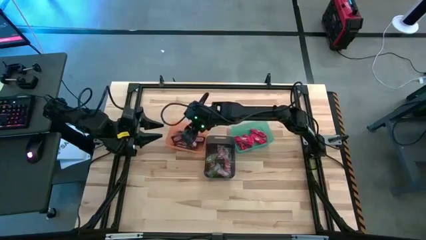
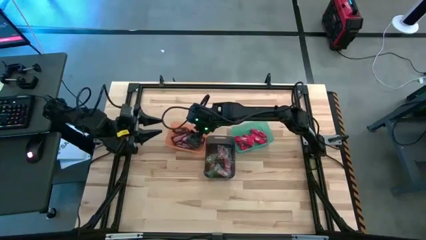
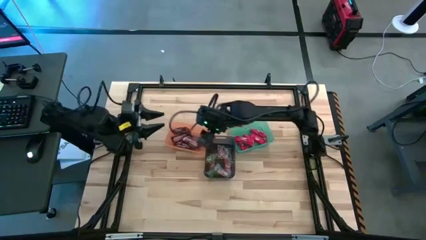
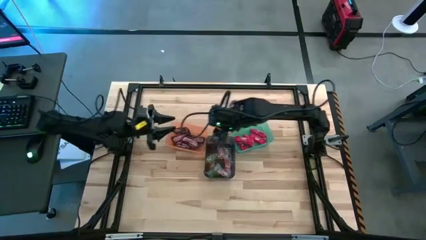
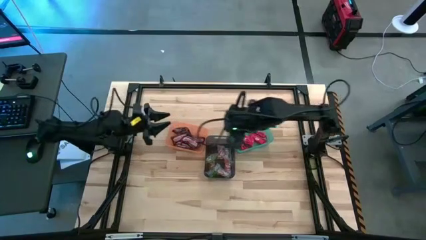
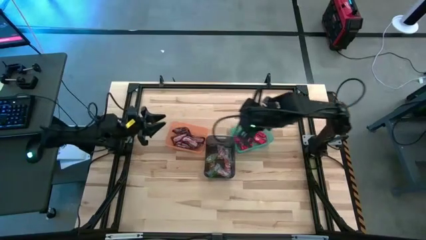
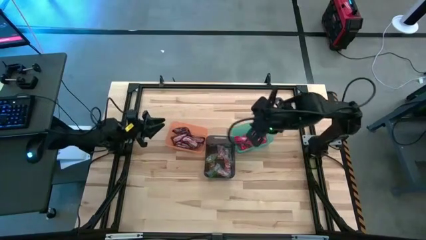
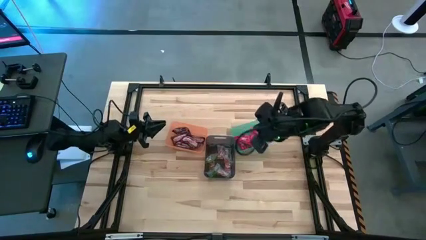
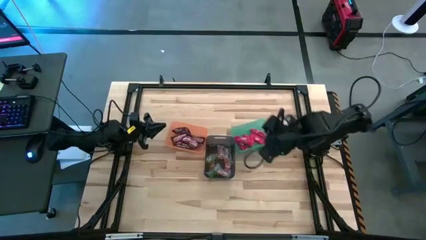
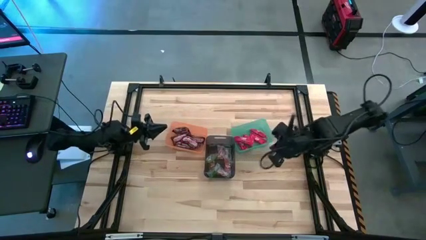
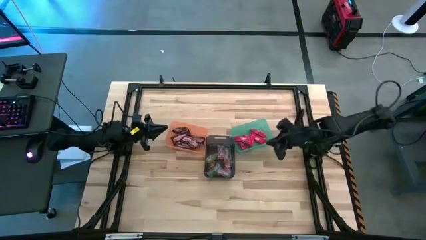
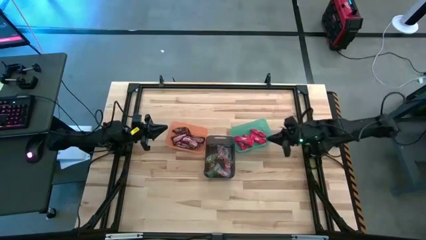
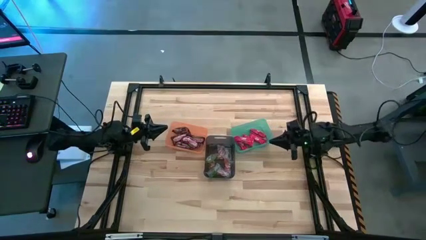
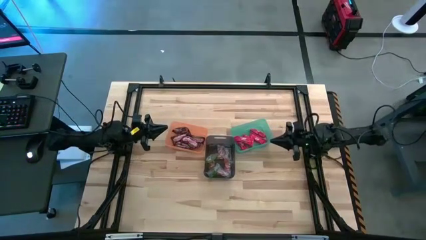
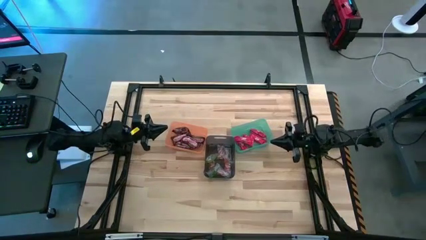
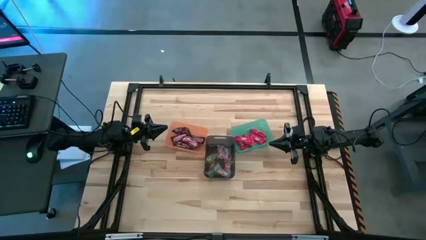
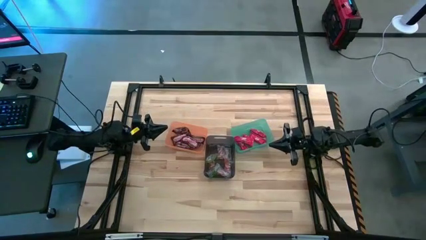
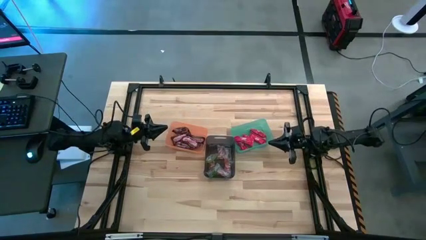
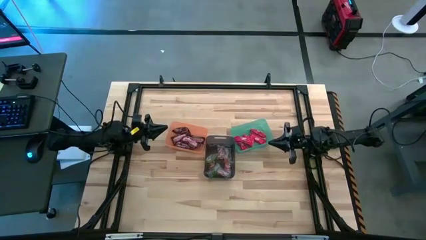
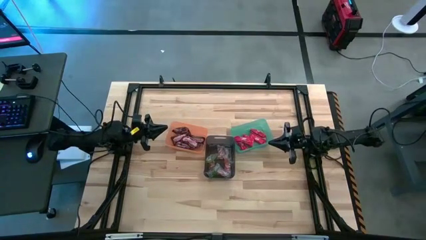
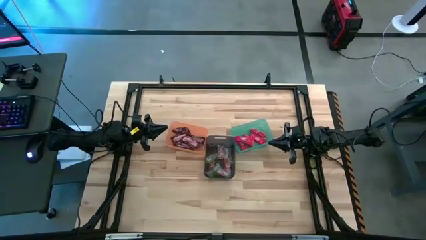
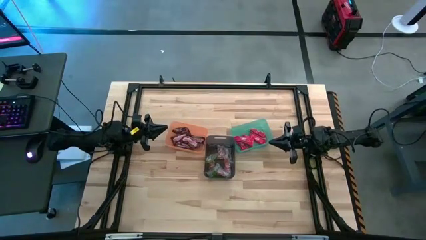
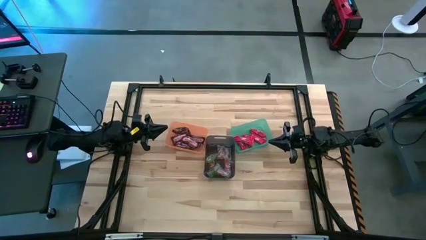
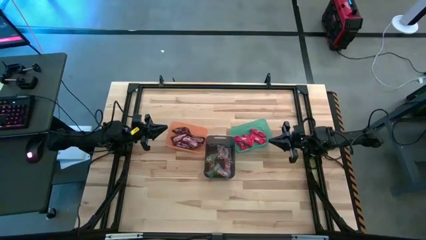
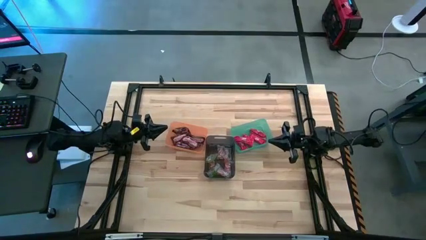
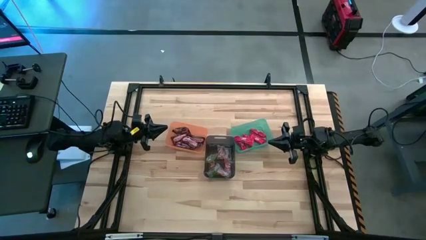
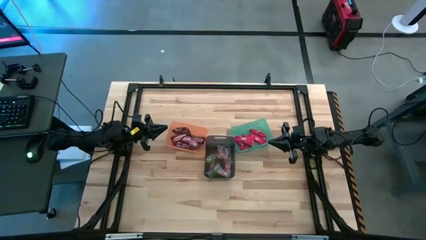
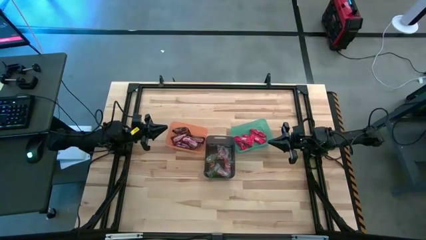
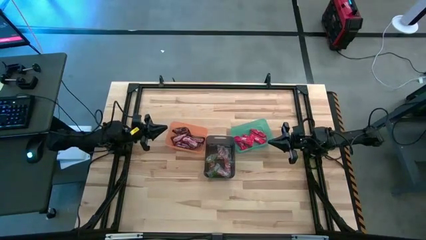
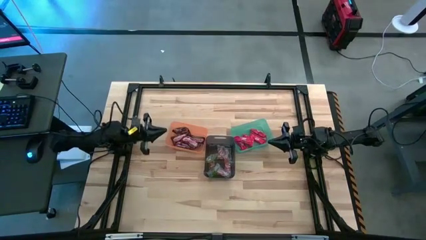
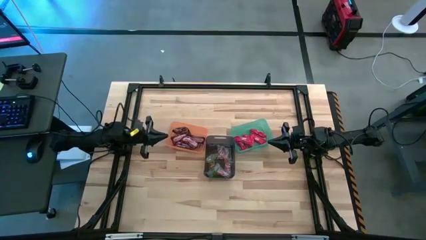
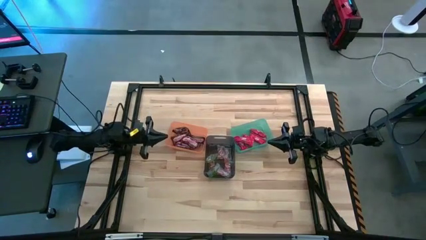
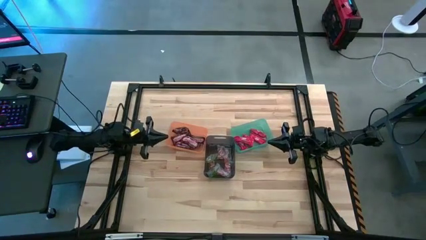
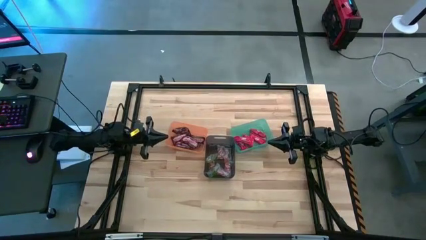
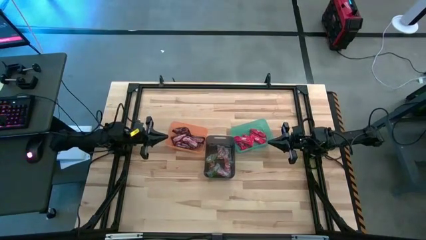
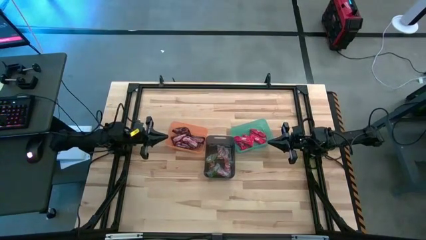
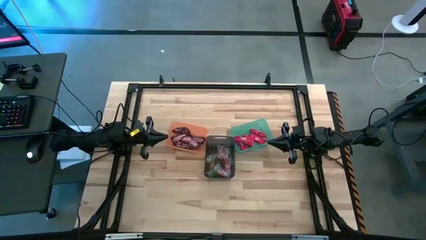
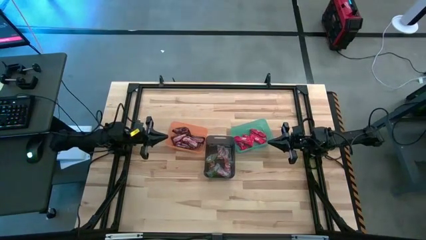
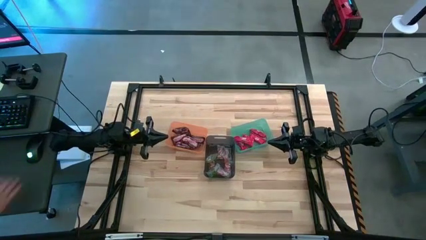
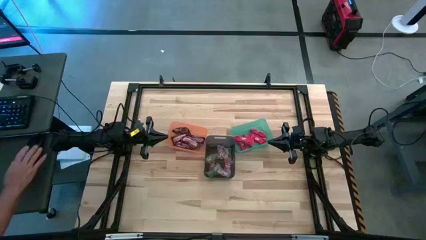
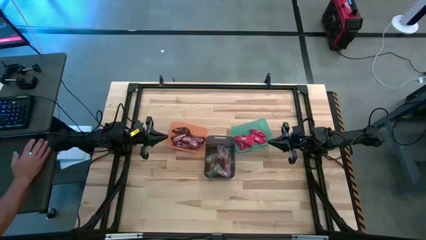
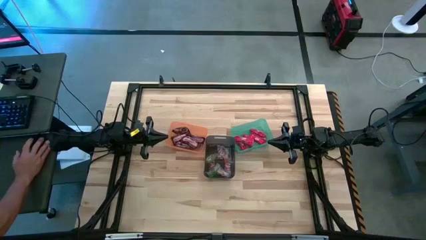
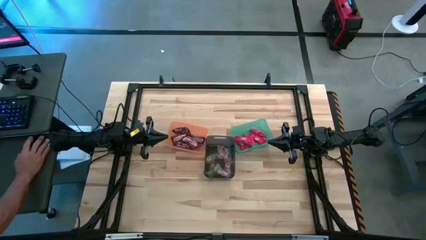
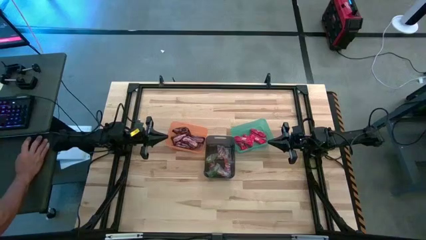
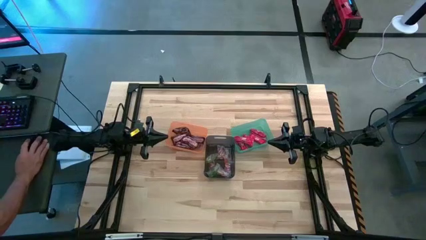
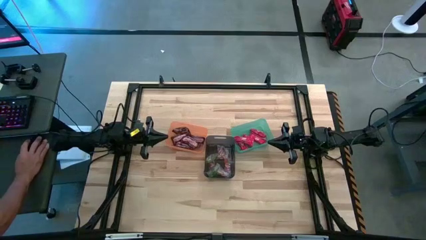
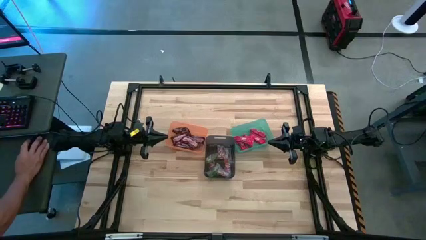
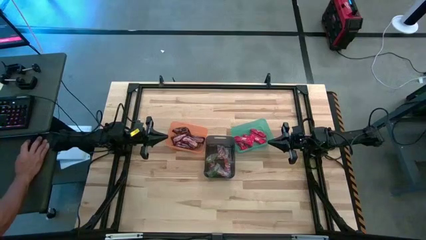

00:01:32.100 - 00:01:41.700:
Task: Sort candy by brand, put in halloween buckets
Return to Home Position

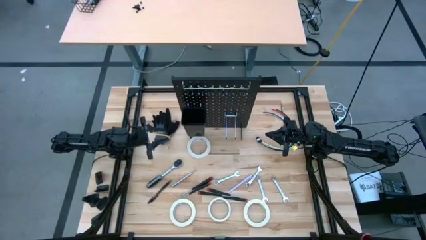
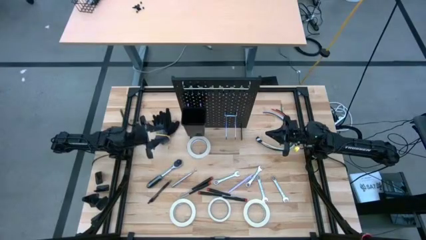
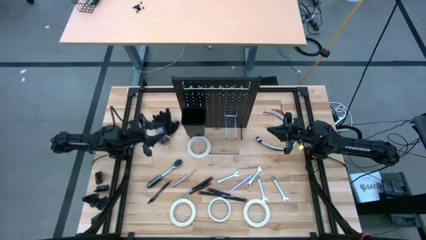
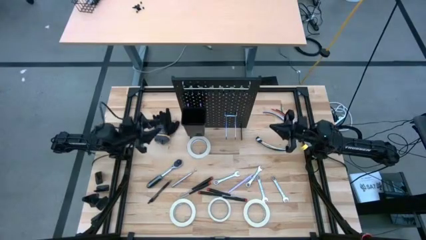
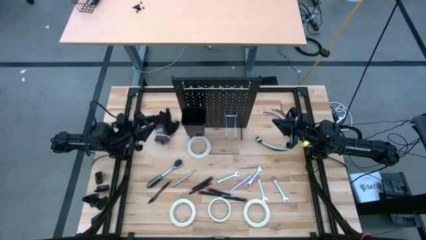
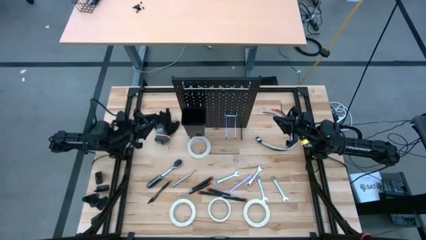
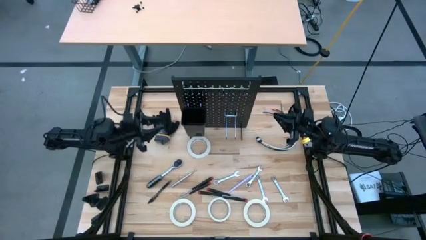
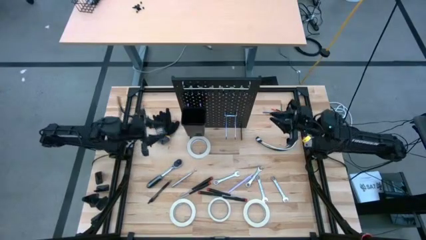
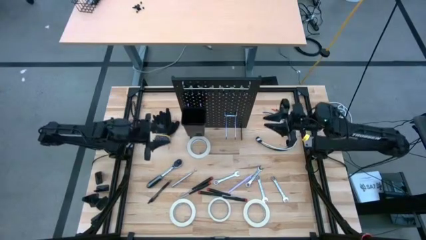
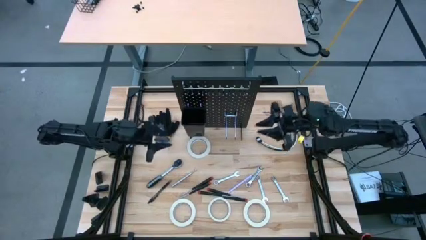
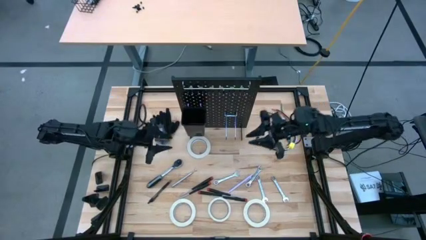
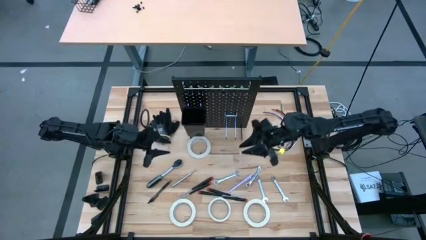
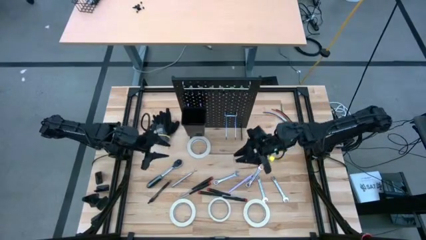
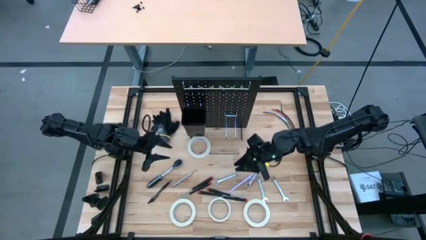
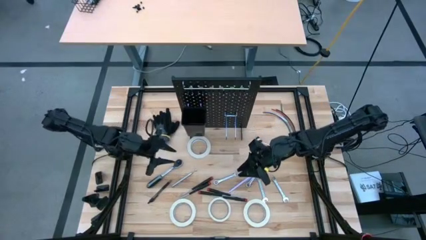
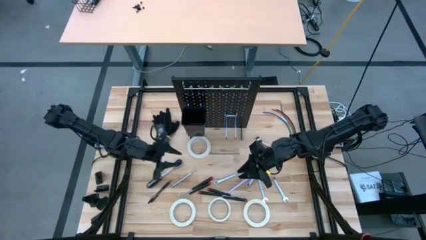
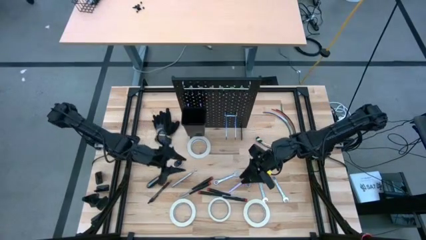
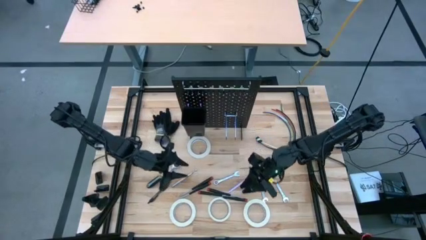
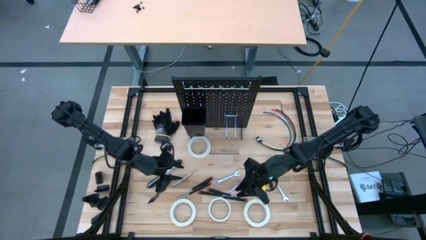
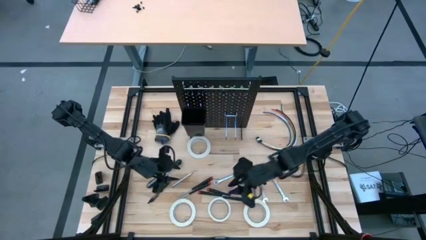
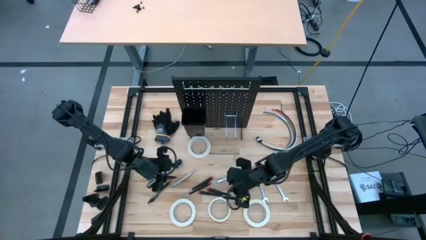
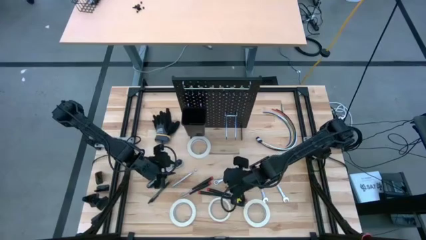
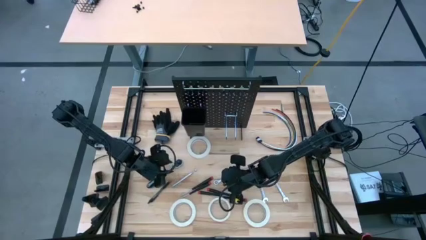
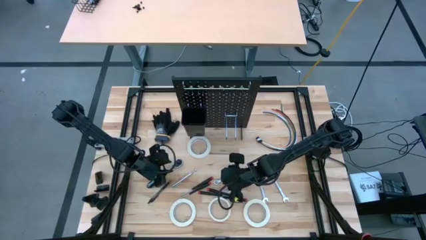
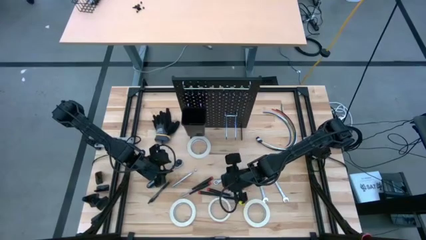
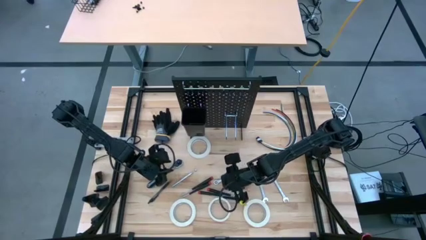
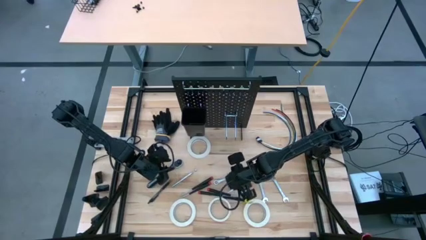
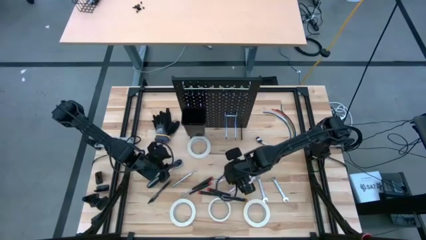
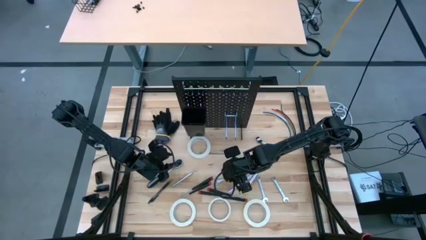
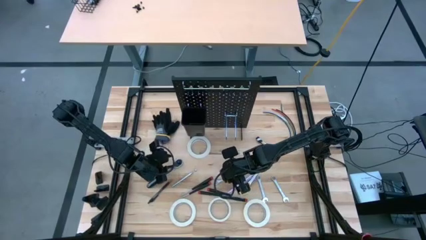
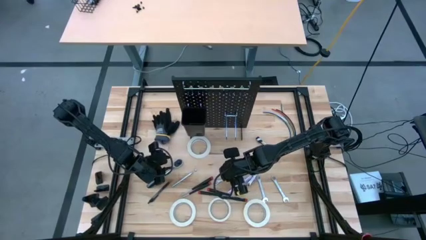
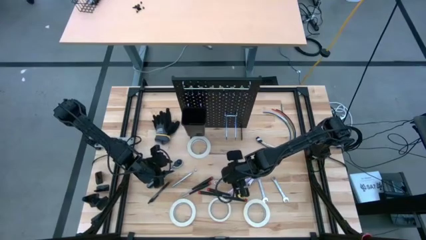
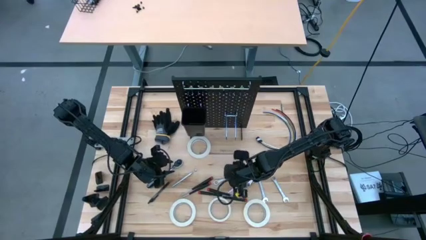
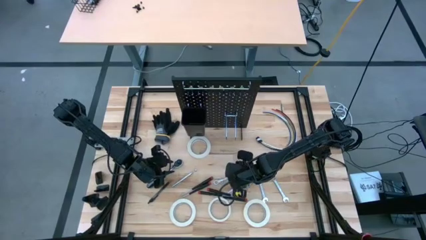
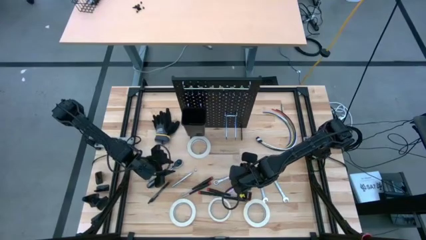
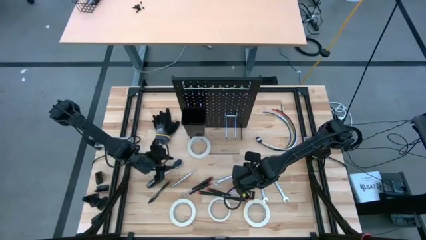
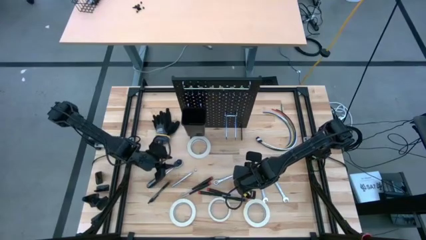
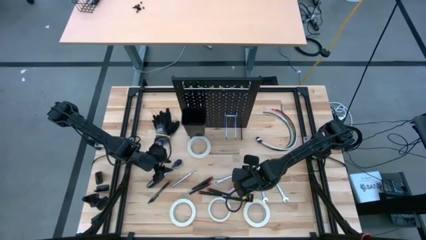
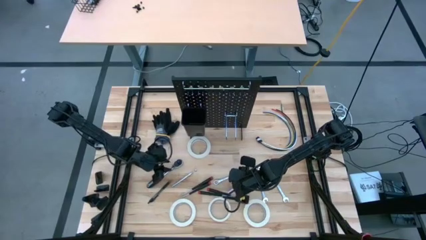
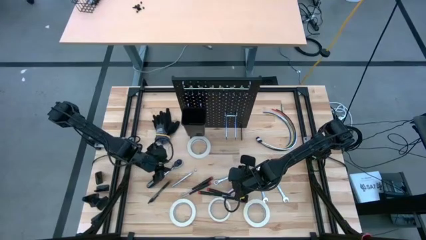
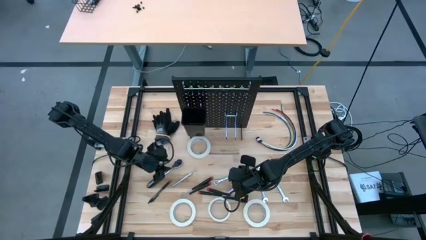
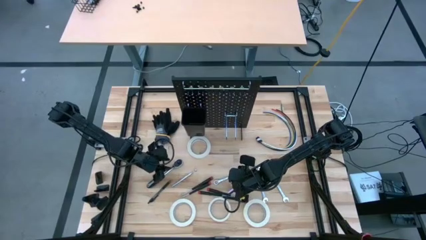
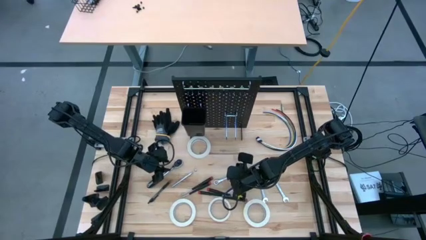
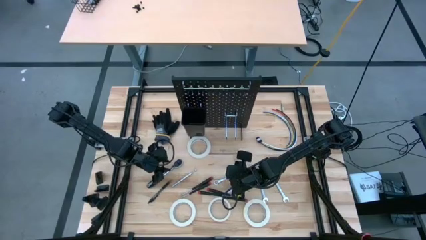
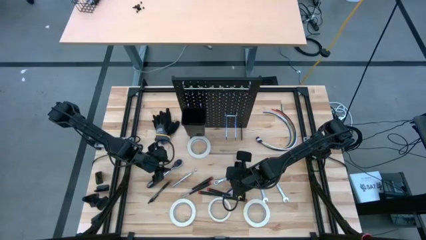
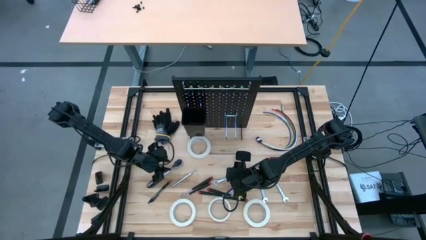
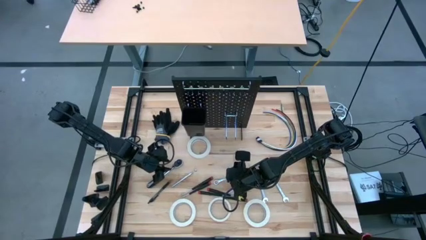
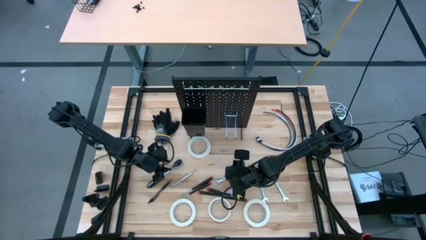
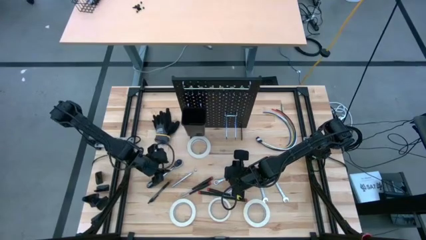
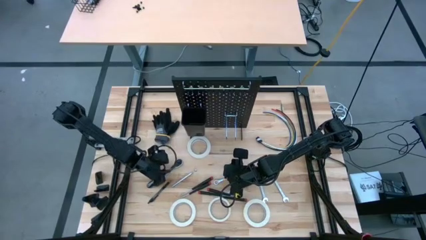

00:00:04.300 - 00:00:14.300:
Task: Hang tools onto peg board
Put the gray ratchet wrench into the black bin on the peg board
